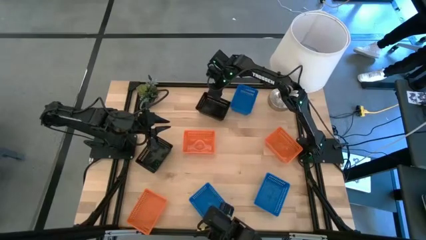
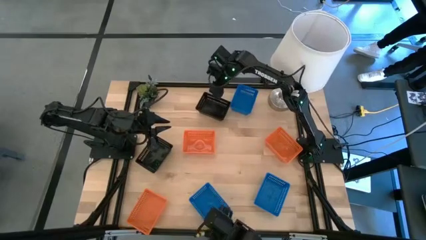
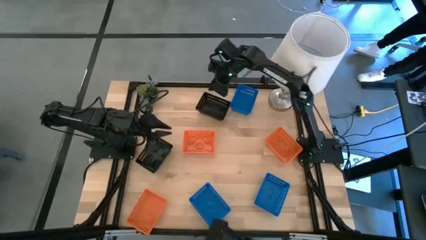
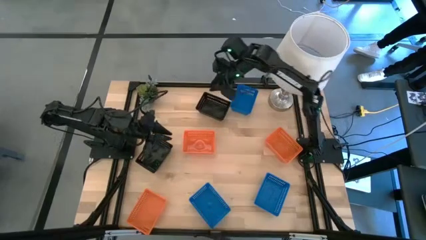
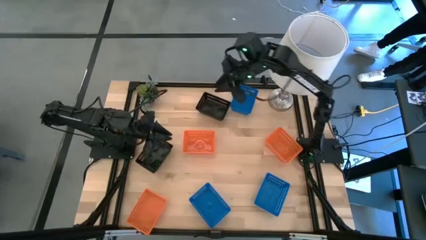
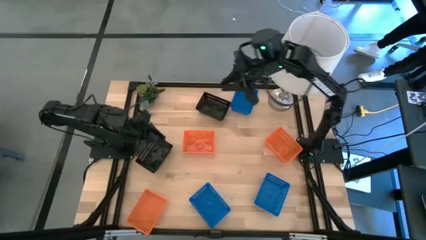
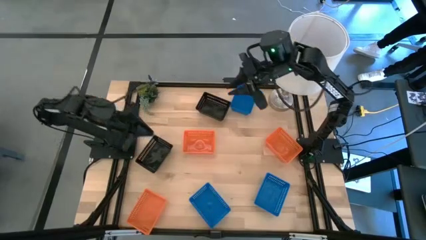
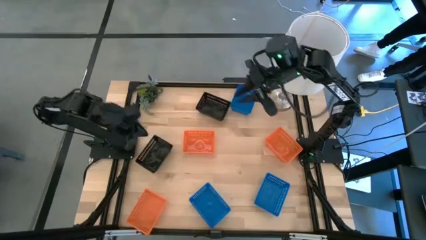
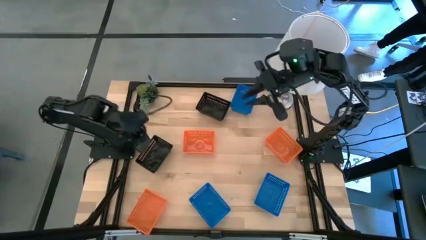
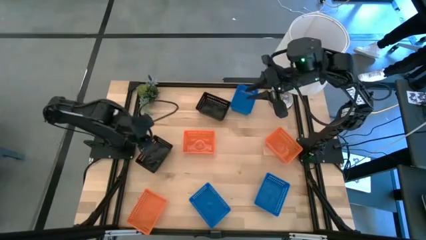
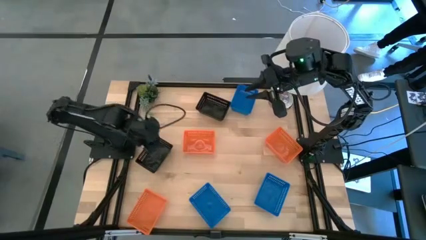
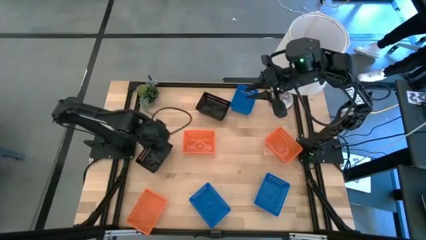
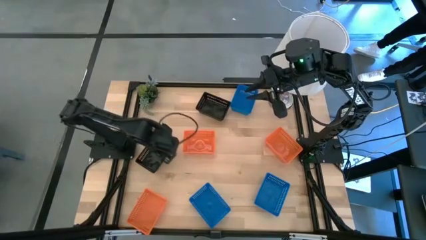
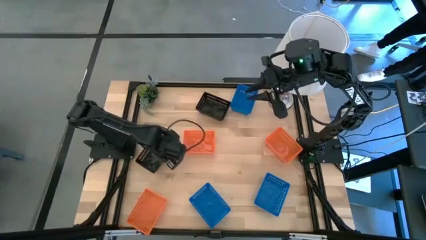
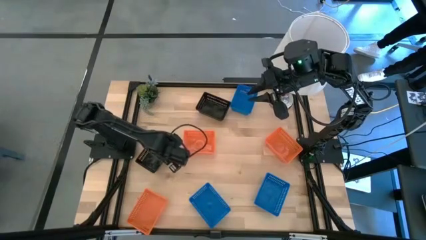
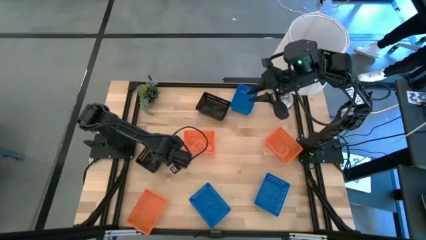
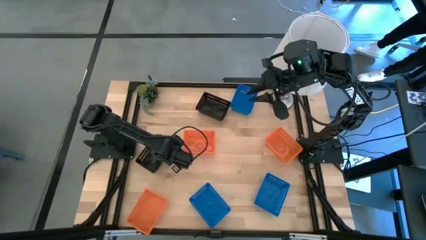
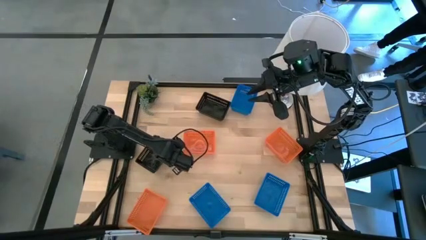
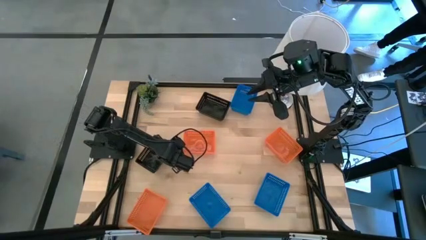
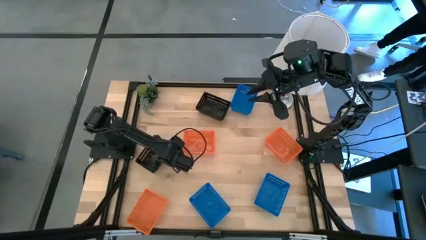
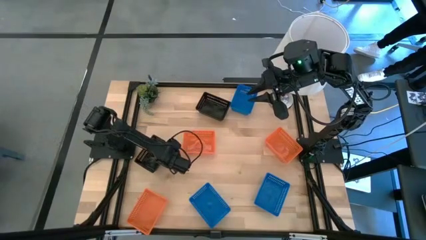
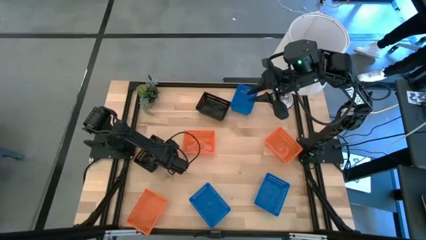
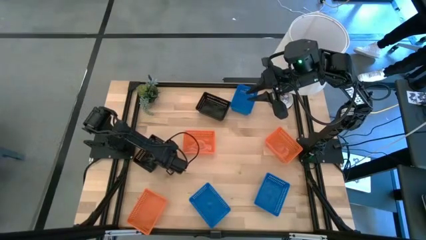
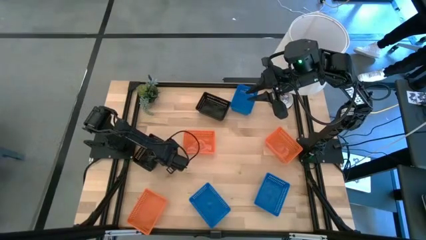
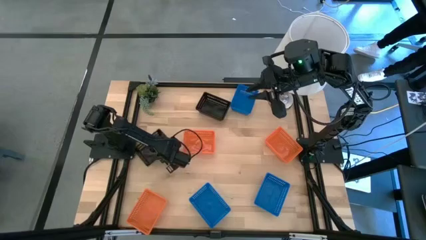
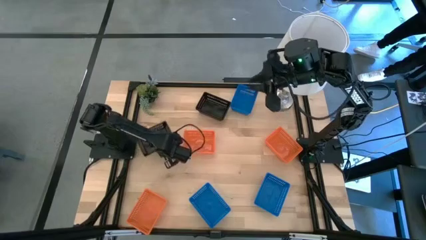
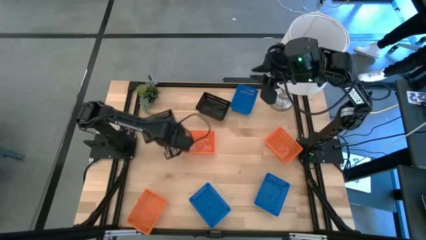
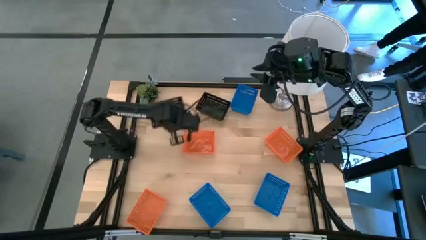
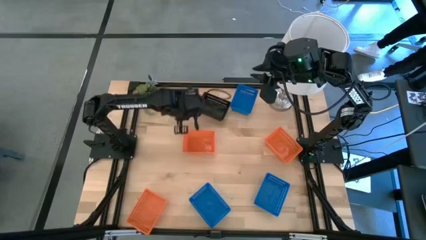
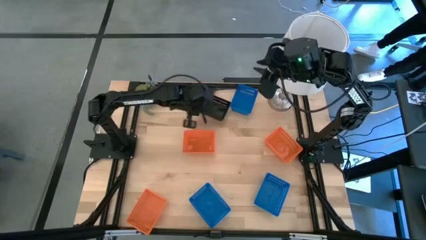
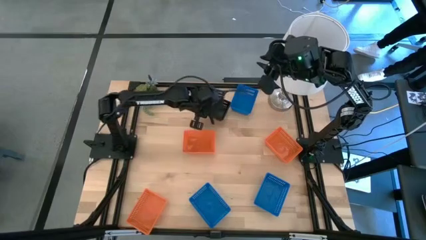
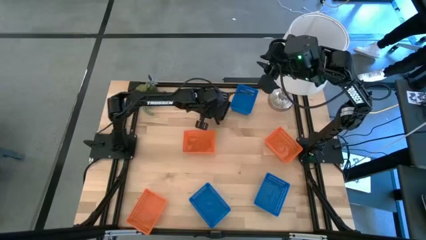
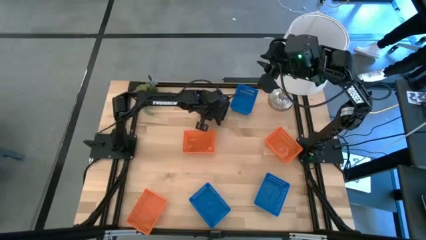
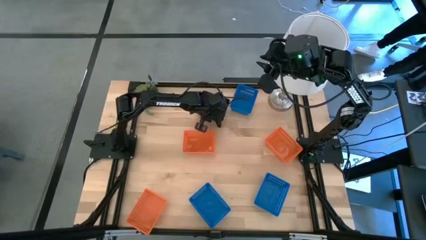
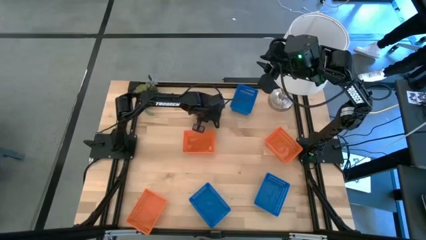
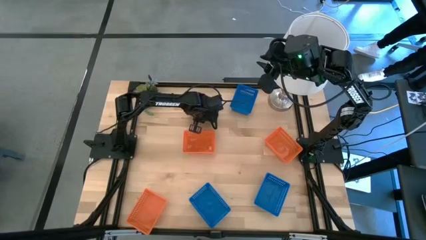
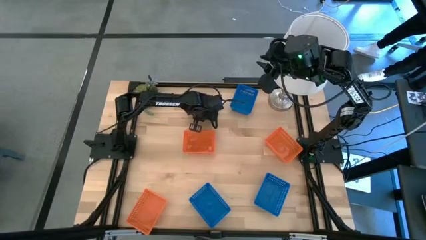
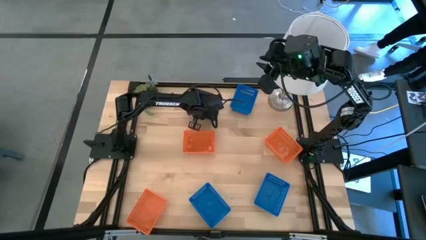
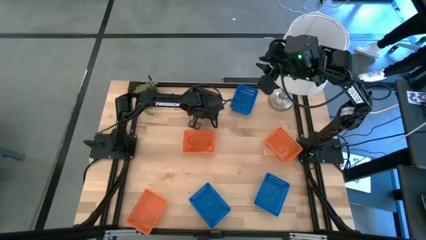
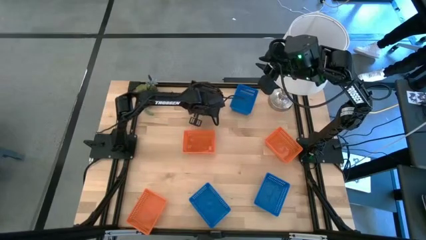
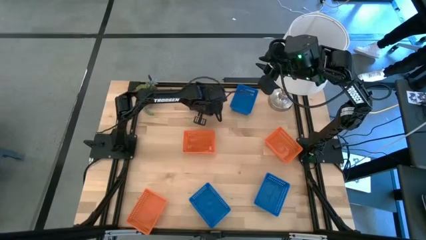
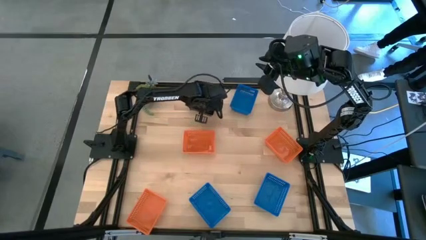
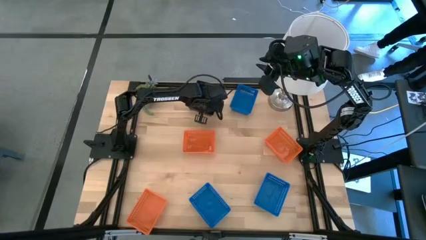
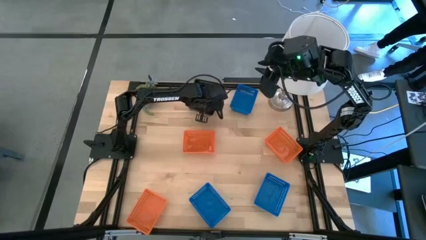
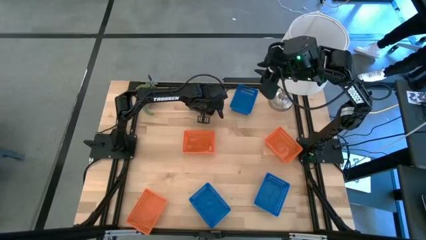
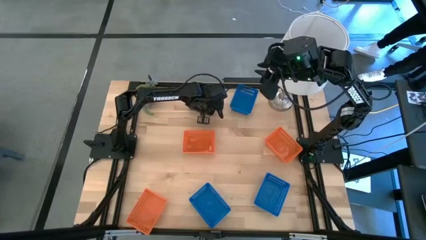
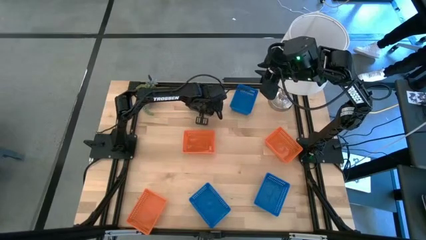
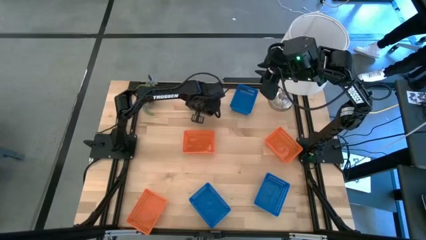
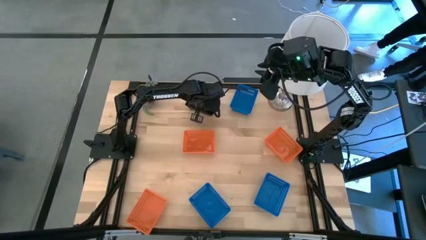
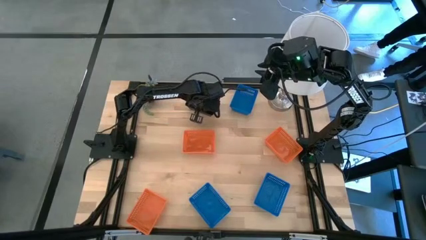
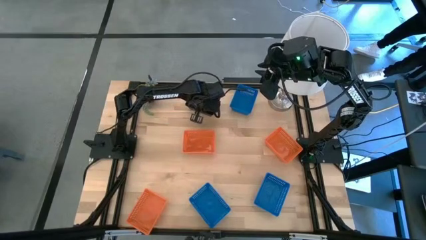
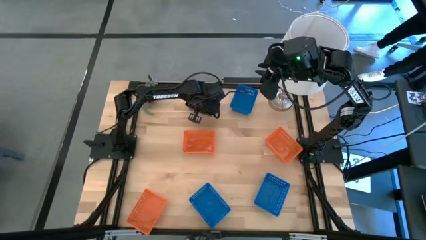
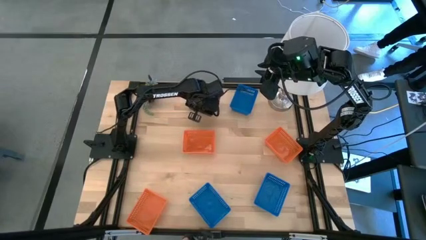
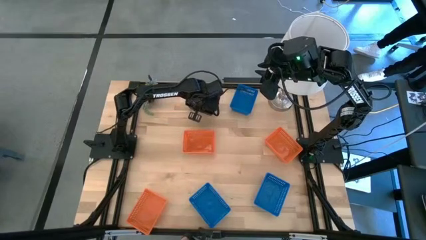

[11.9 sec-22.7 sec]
Stack the bottom black bin on the stacked black bin

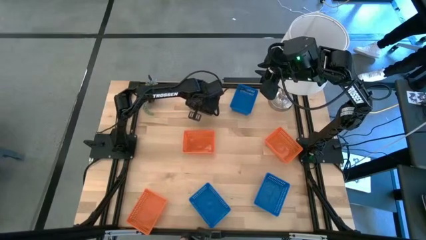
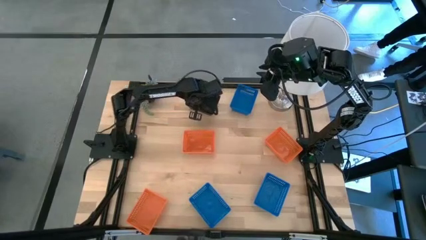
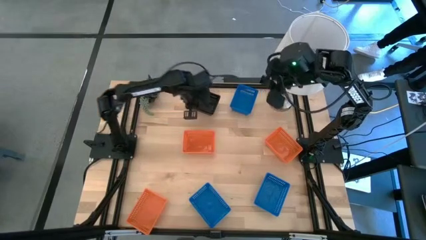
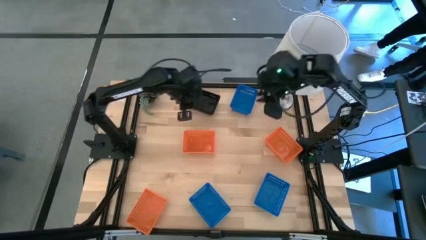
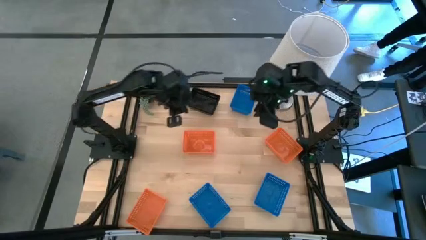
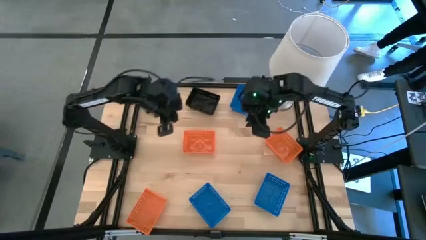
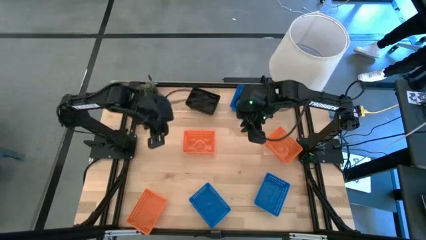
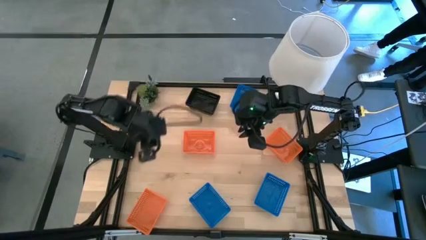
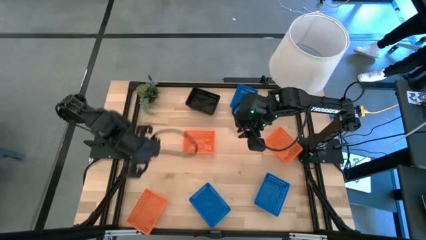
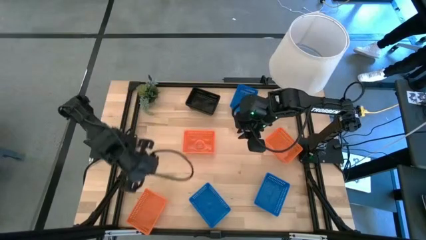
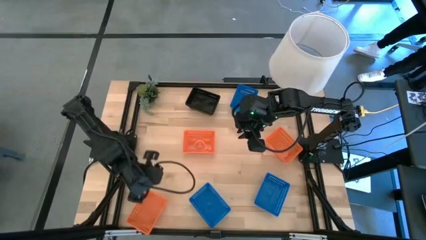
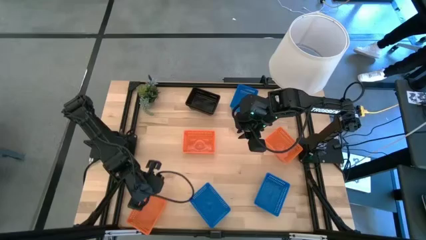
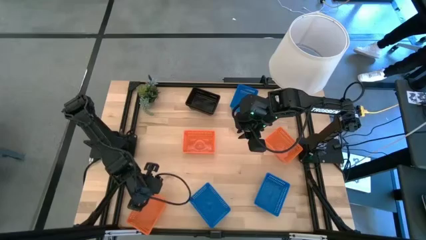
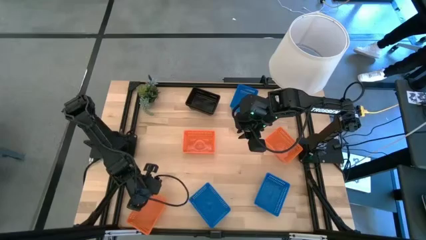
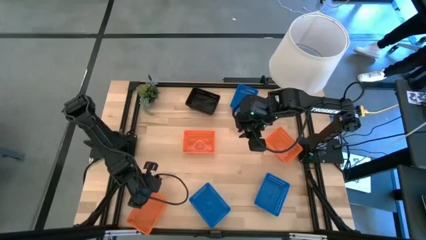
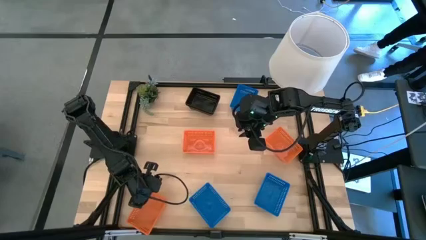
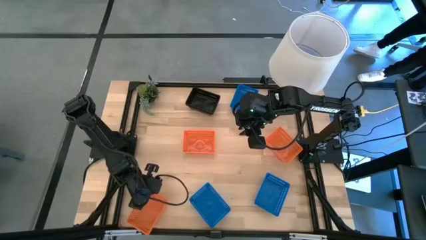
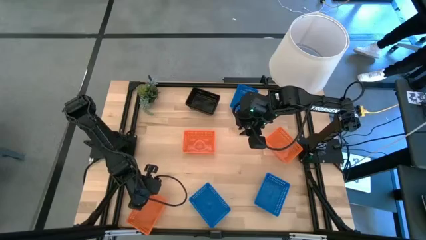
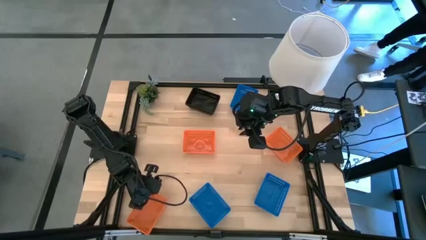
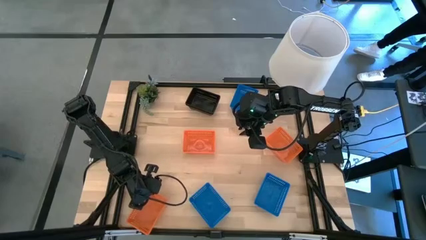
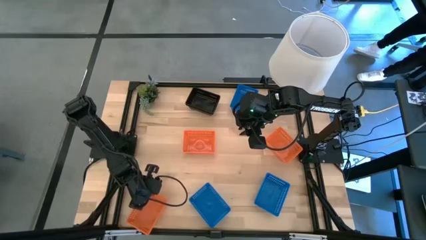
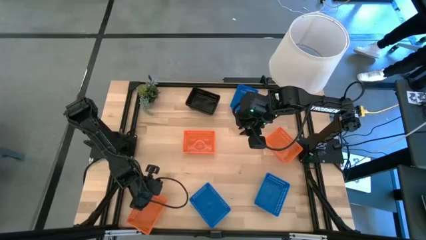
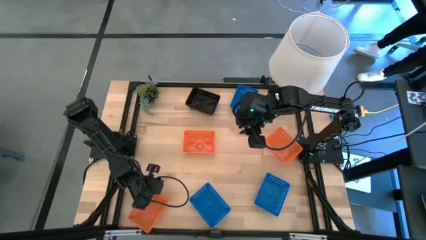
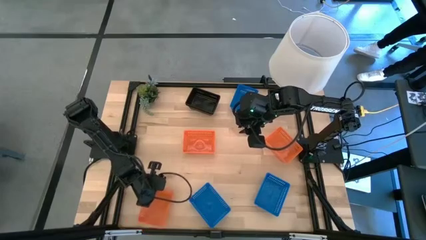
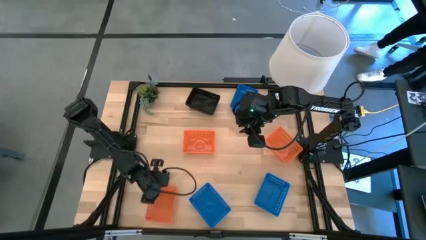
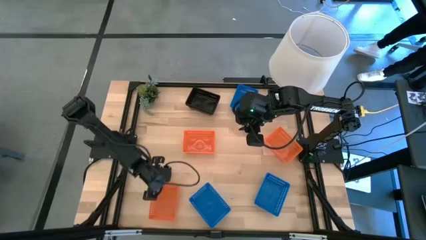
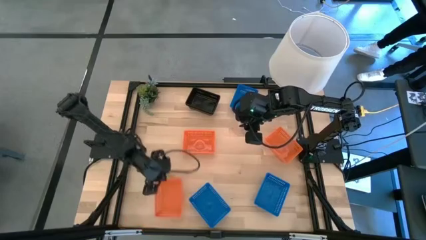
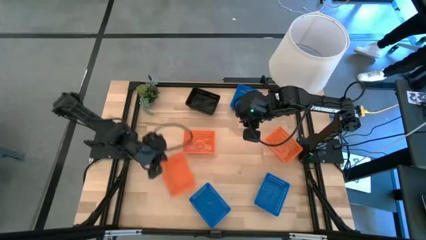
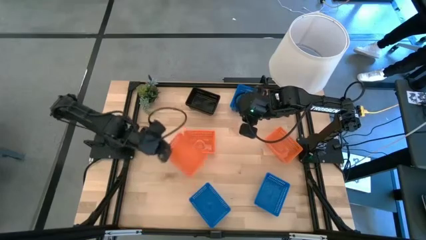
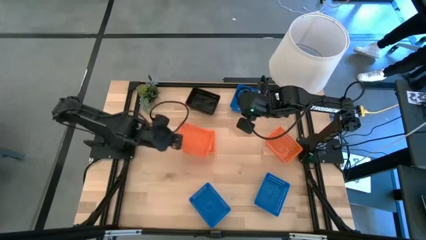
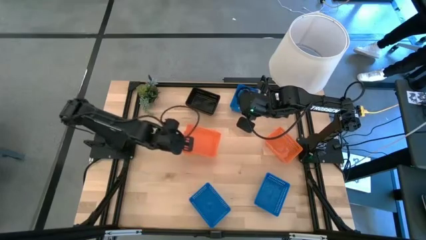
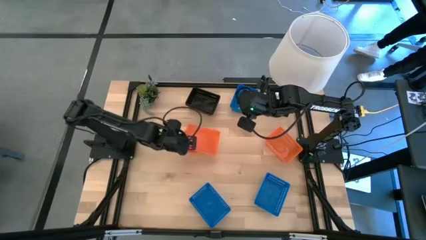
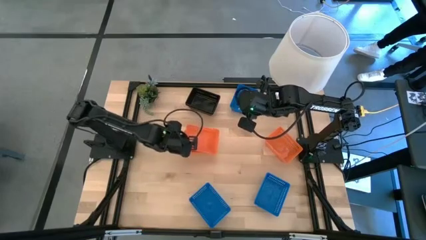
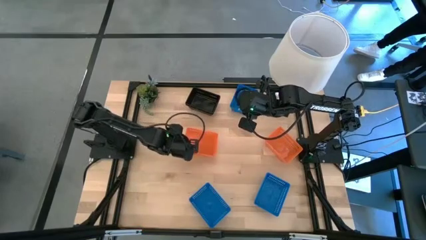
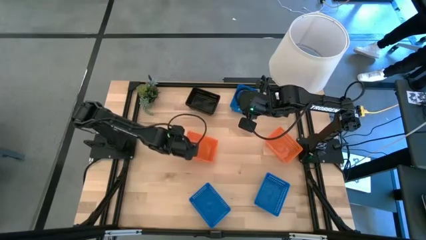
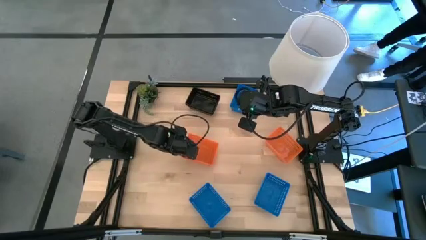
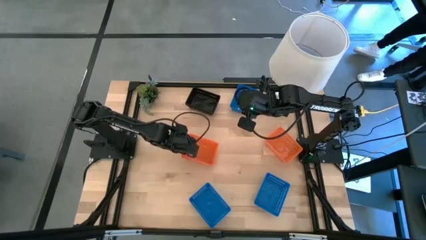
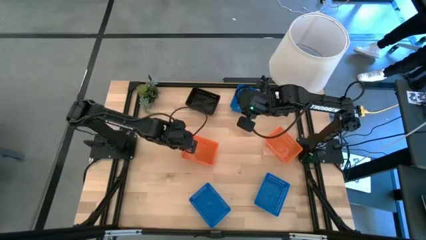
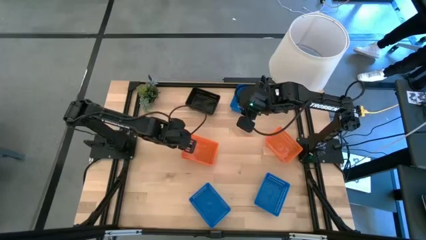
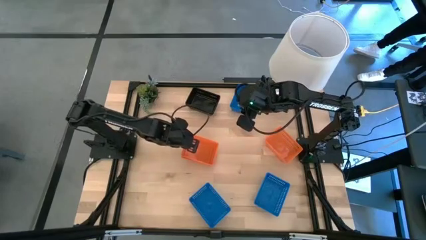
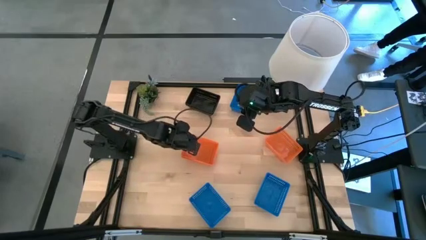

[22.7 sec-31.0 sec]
Stack the bottom orange bin on the top left orange bin
